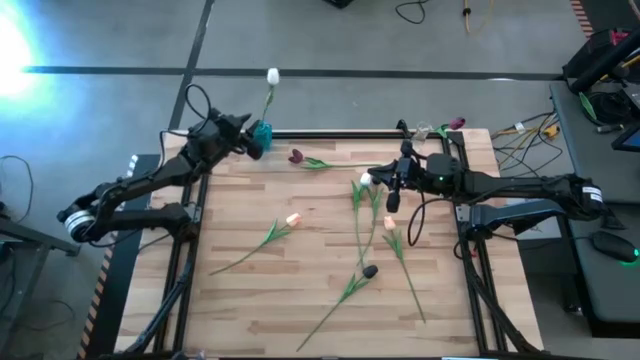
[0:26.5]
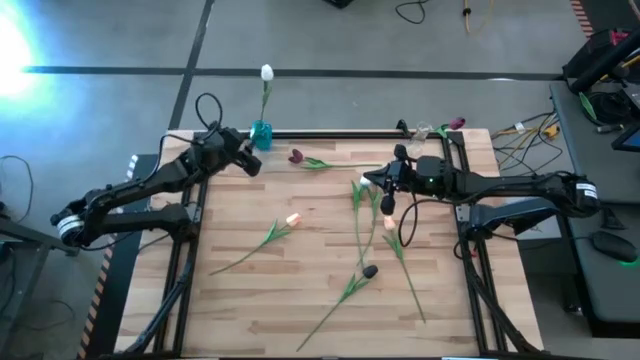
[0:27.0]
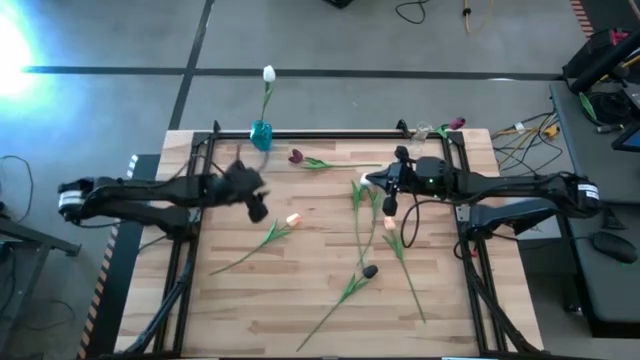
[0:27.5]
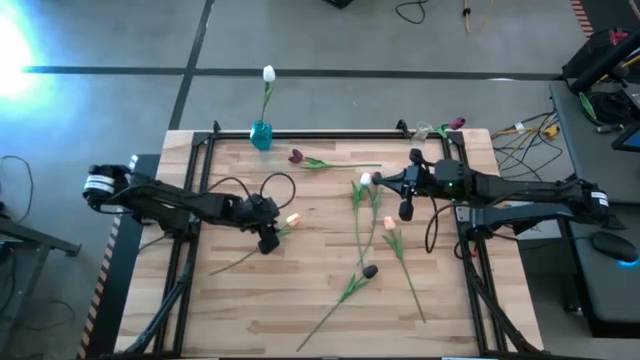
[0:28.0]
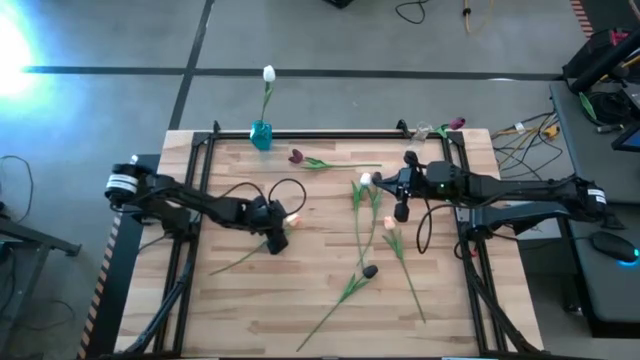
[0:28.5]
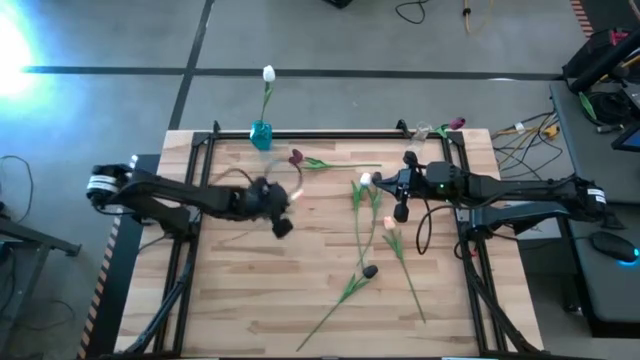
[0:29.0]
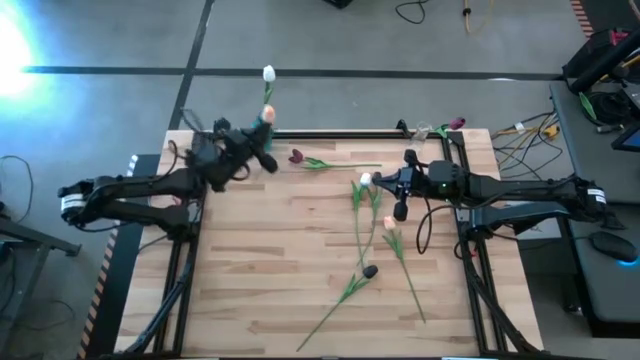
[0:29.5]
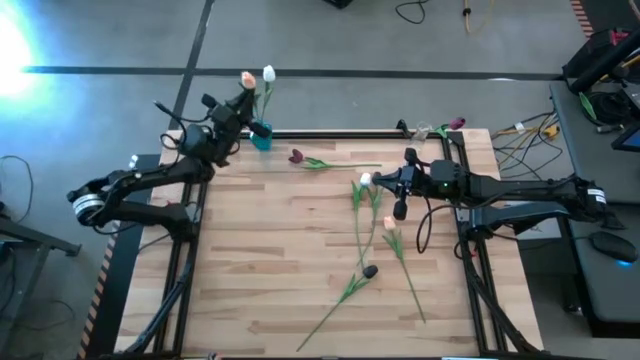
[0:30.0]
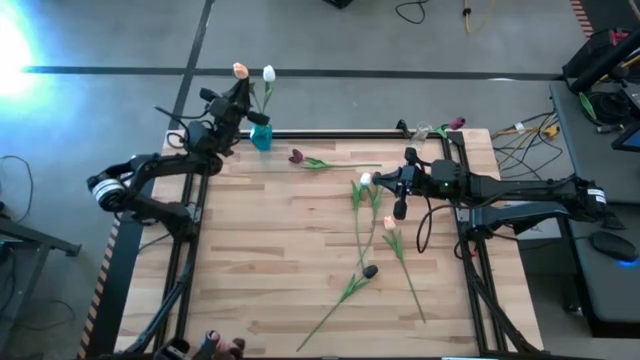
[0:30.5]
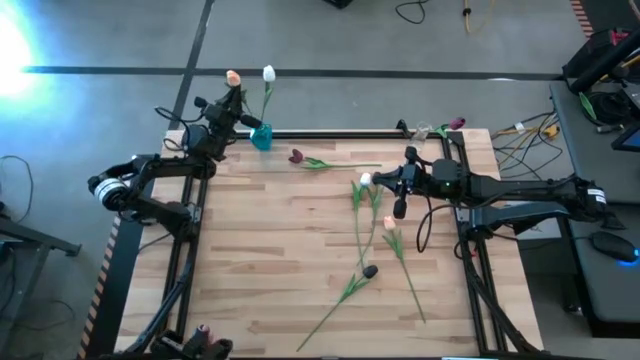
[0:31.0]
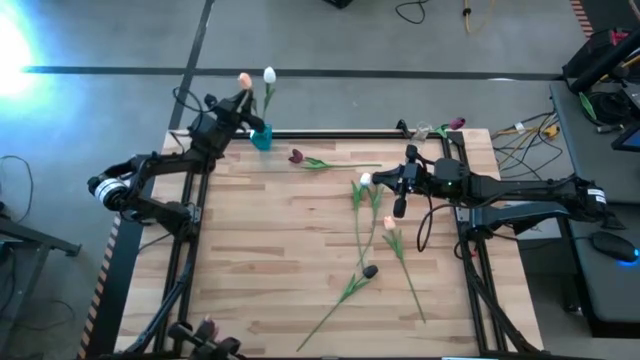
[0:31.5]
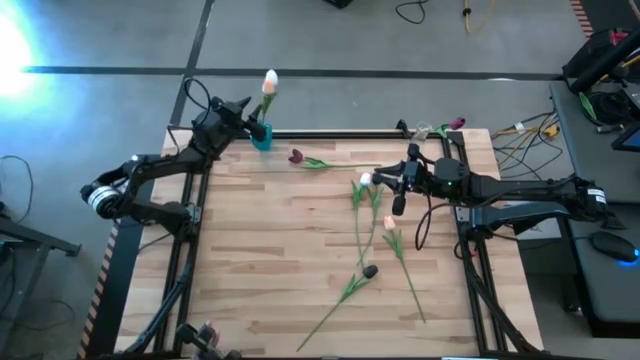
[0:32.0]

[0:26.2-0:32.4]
Task: Sort flowers into vase by color
Put the left orange flower into the blue vase

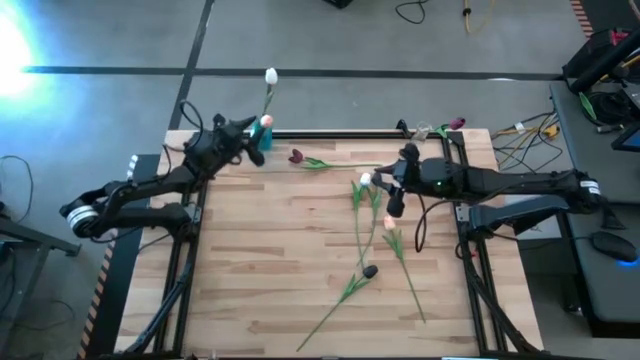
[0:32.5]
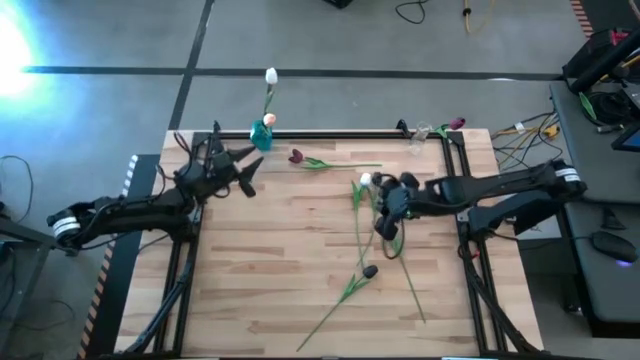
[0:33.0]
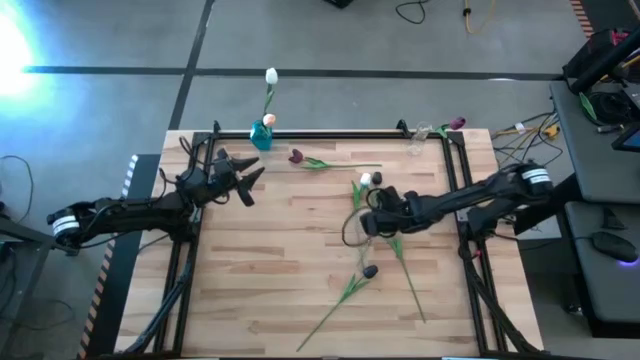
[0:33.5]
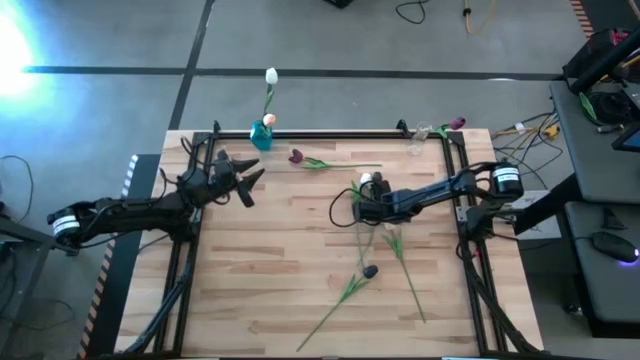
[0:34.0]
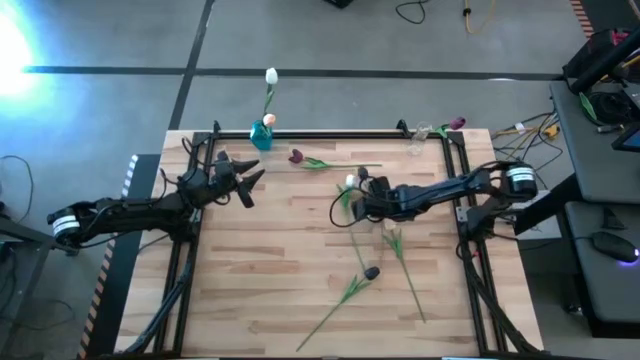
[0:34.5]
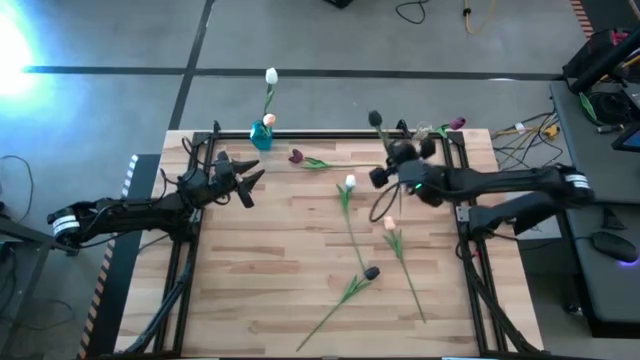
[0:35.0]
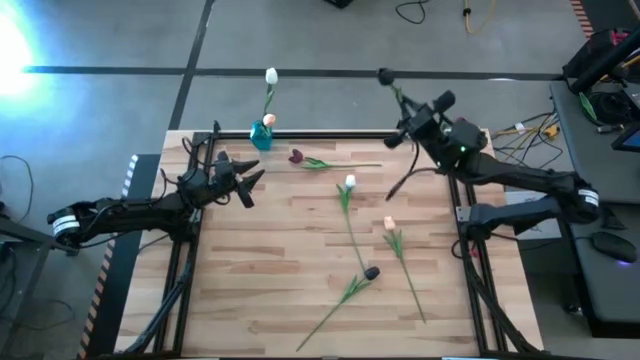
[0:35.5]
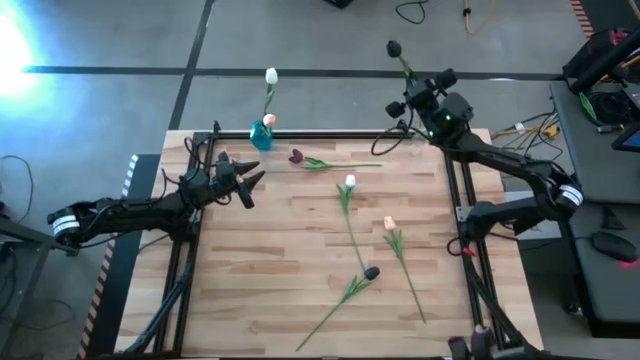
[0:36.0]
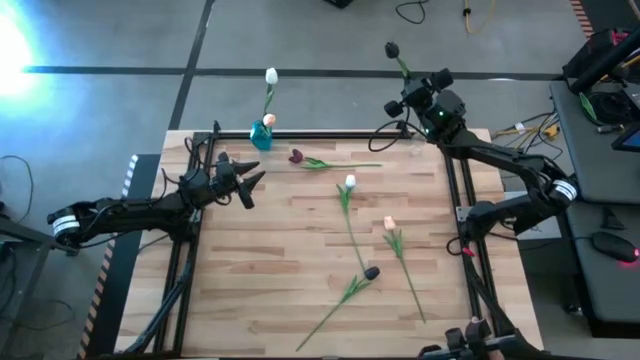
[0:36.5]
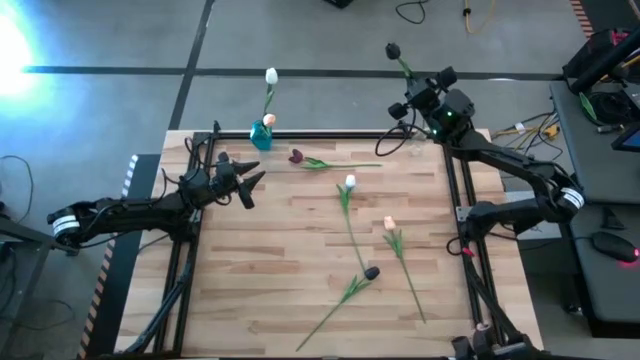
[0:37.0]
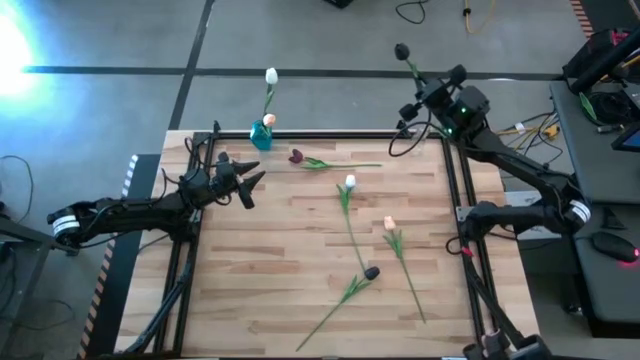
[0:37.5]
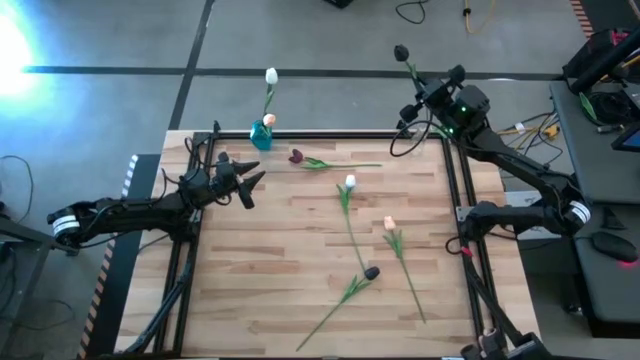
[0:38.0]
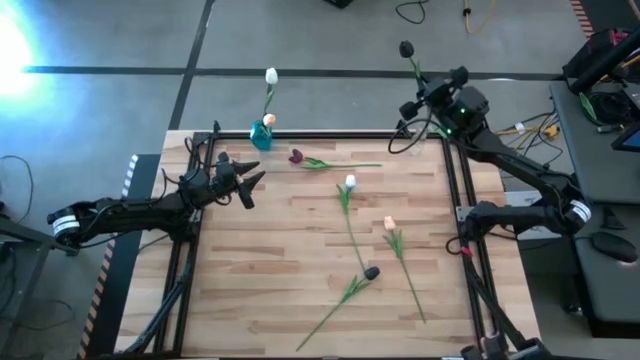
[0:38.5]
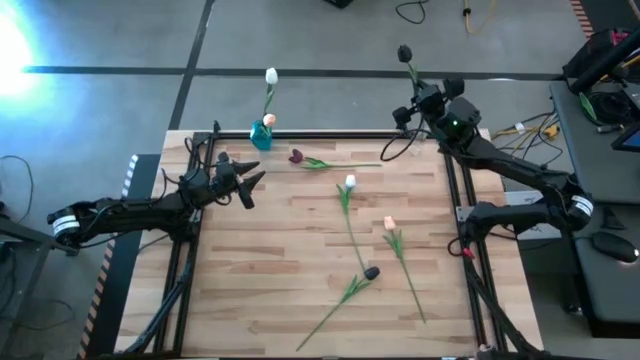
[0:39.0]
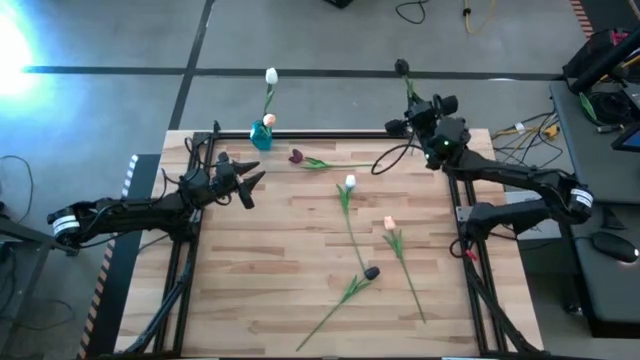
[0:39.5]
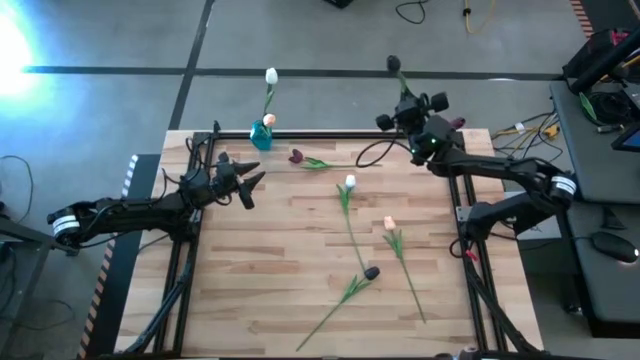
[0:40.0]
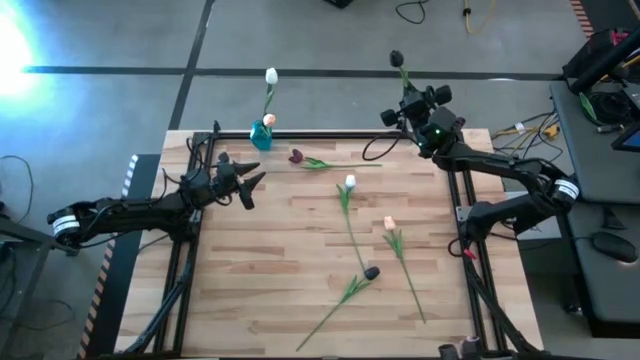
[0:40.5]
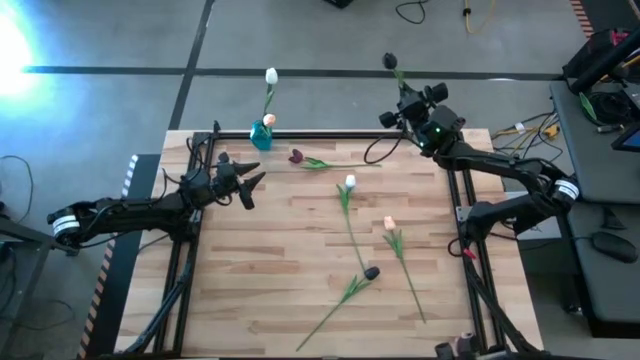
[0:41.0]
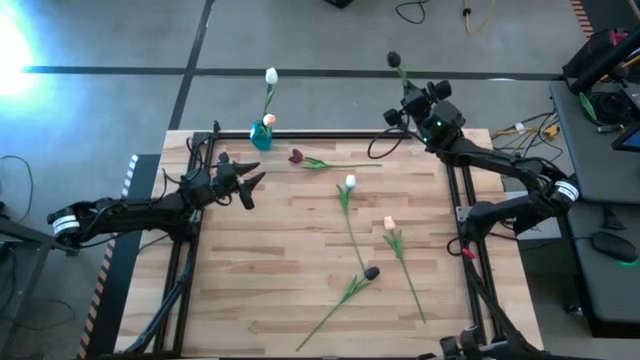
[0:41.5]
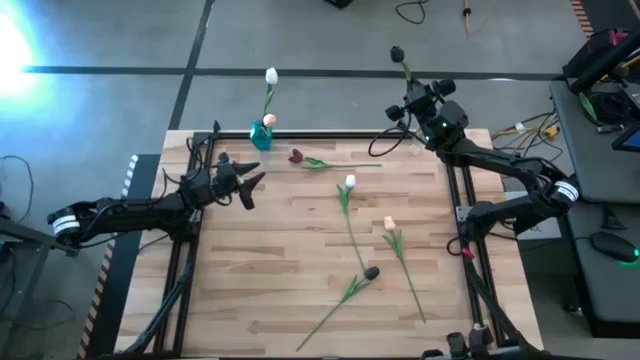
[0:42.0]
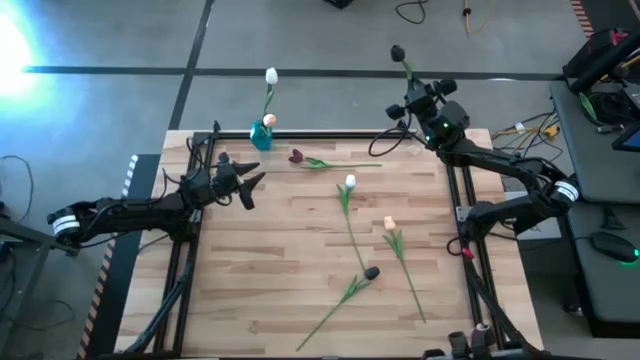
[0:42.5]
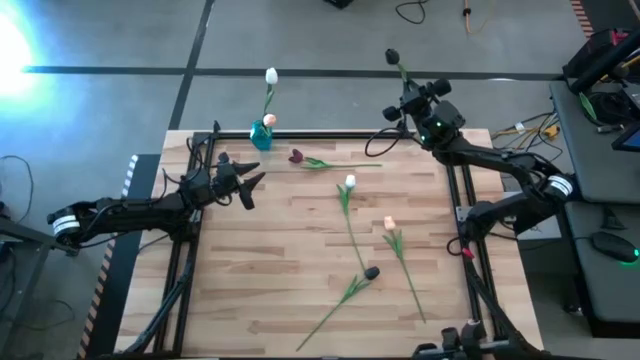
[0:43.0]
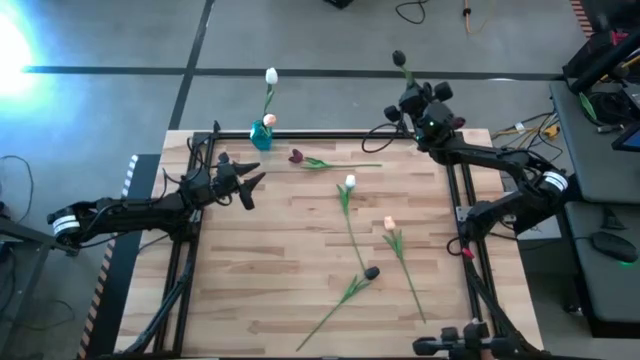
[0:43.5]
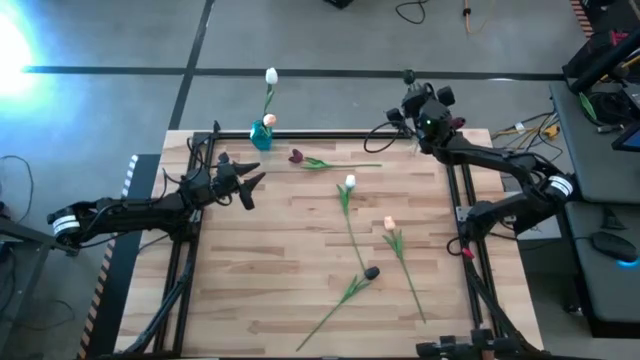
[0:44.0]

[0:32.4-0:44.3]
Put the top black flower into the transparent vase

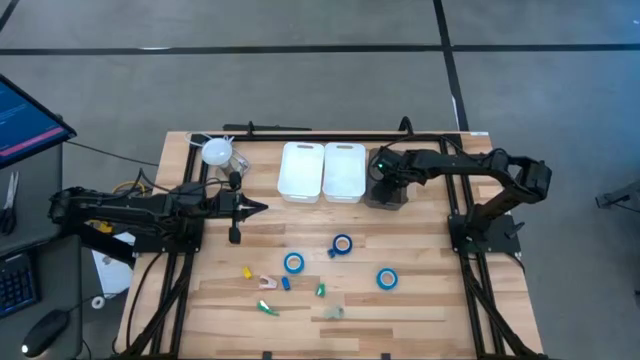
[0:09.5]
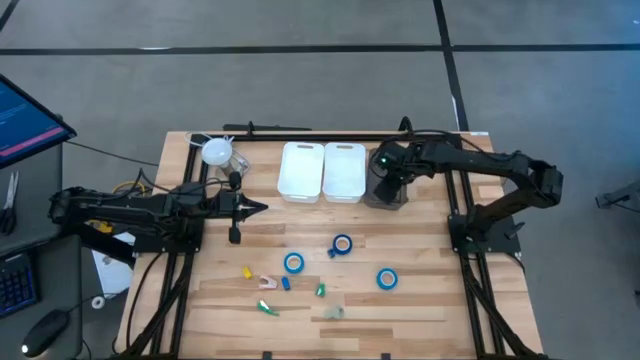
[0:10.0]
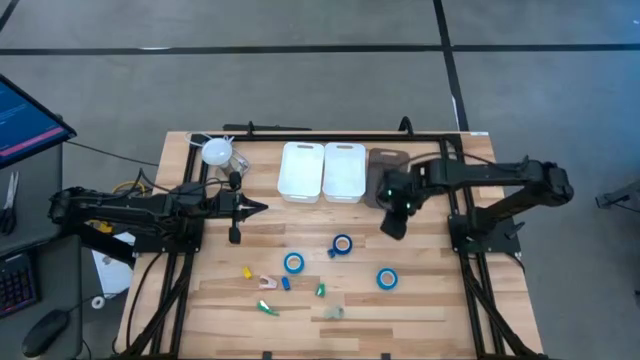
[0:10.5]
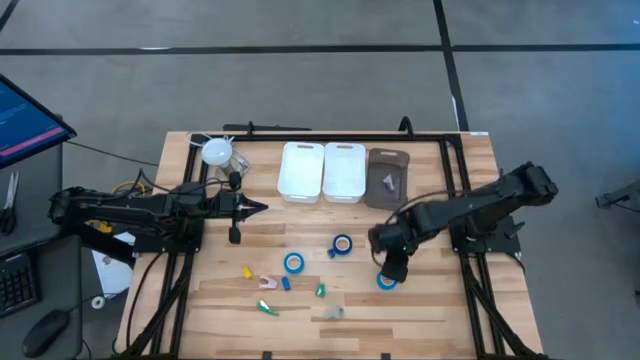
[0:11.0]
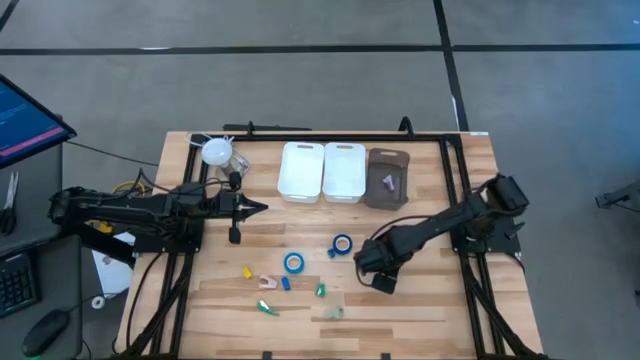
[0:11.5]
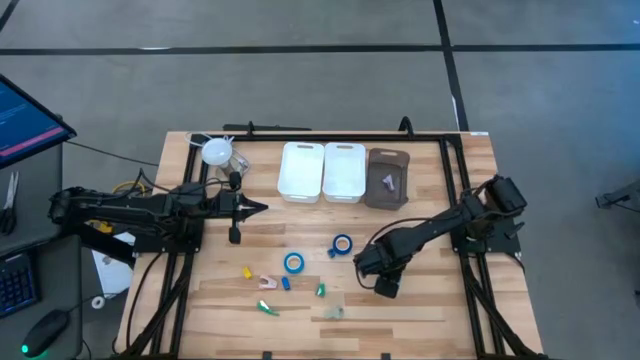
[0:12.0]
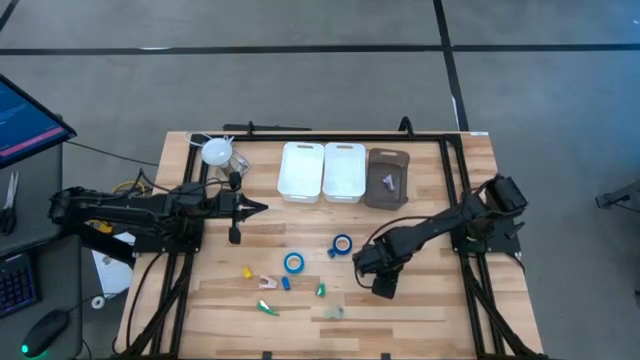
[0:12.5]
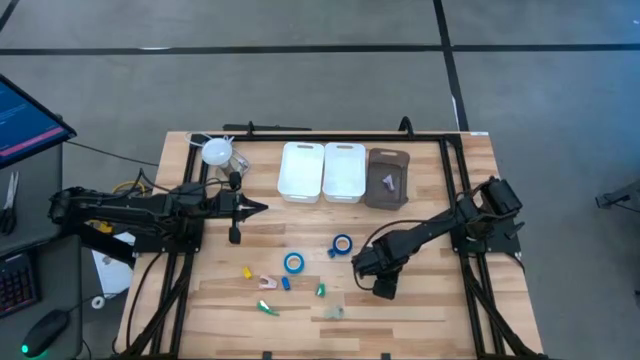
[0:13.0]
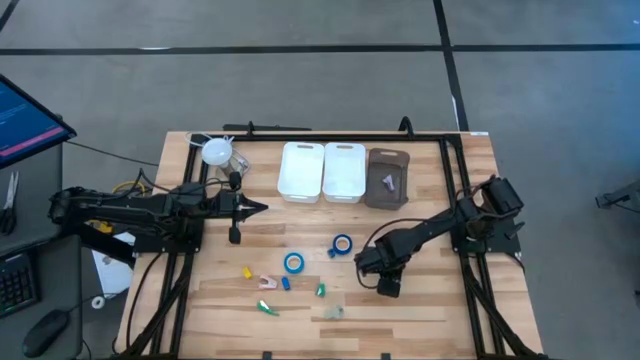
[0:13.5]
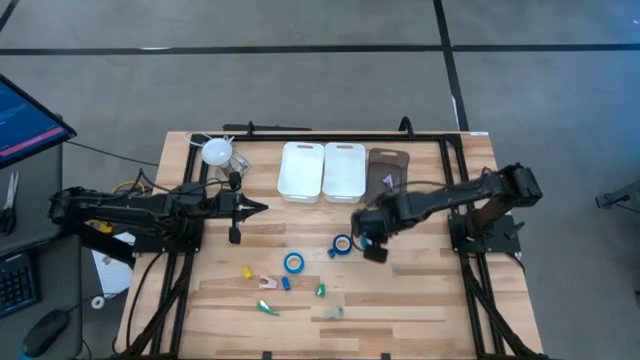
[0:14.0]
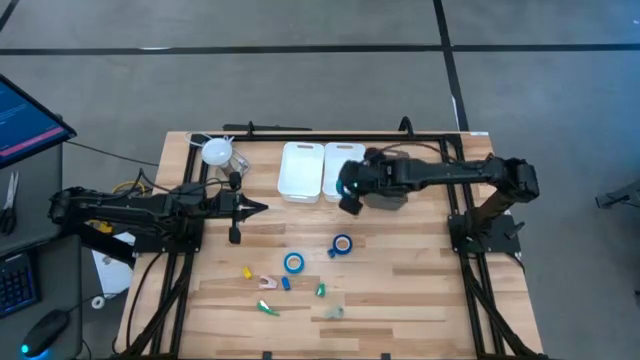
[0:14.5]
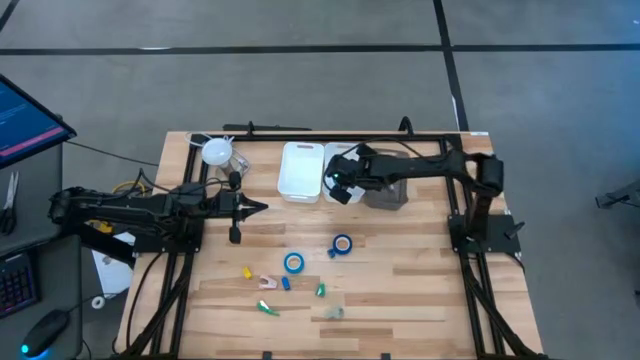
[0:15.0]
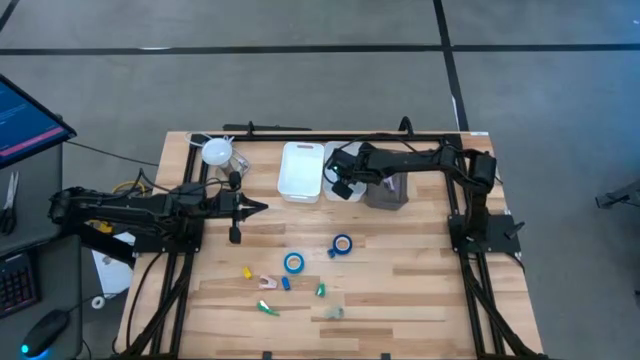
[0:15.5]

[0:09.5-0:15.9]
Task: Pick and place Stapler, Stapler remover, tape
Put the right light blue tape into the right white bin
